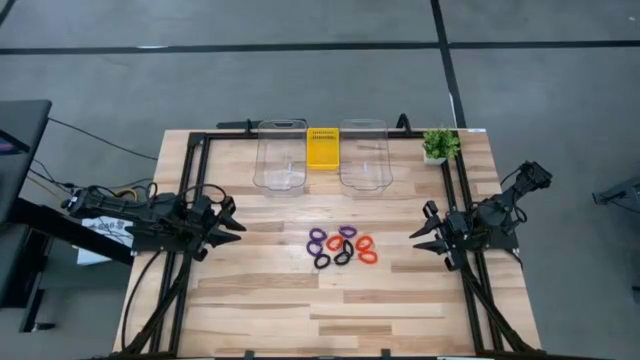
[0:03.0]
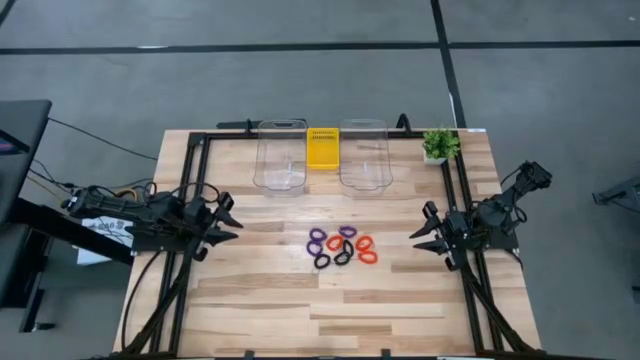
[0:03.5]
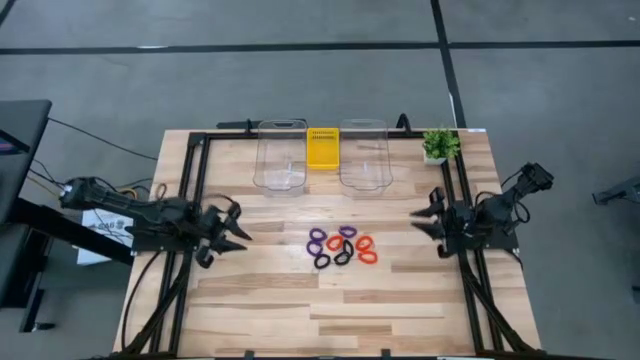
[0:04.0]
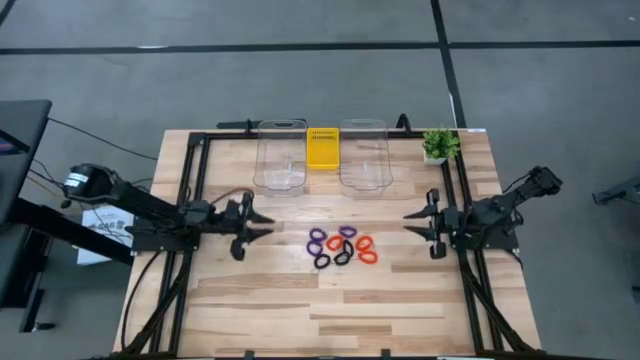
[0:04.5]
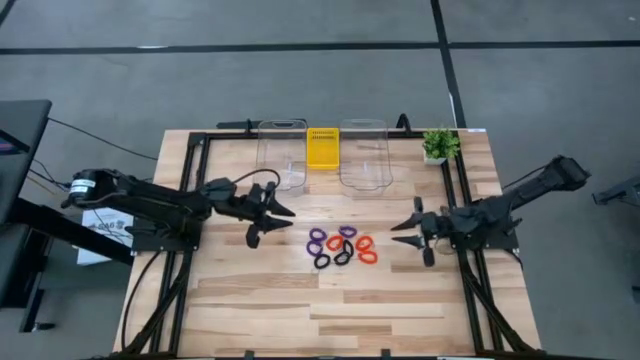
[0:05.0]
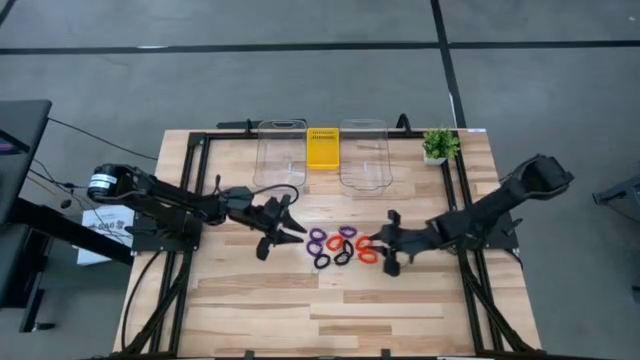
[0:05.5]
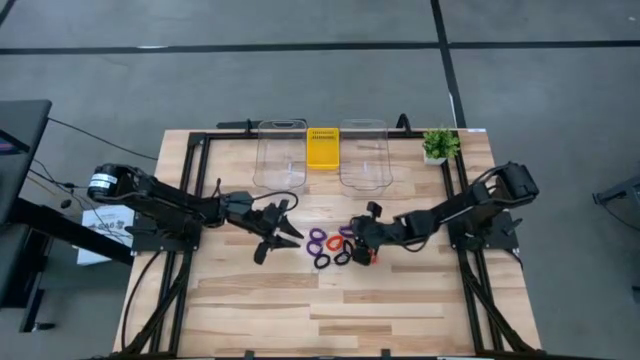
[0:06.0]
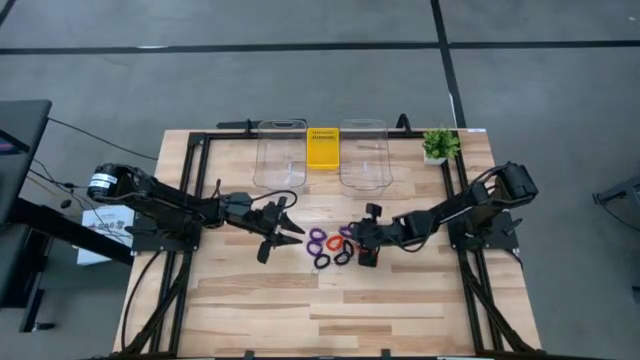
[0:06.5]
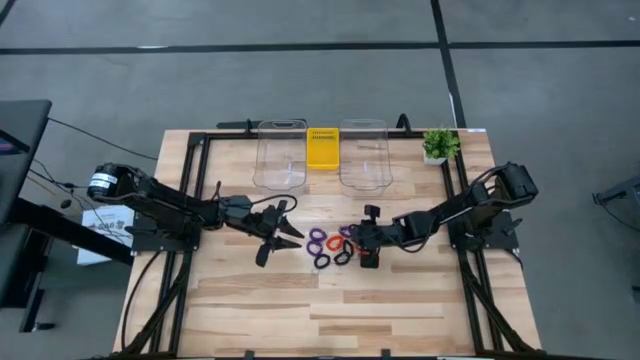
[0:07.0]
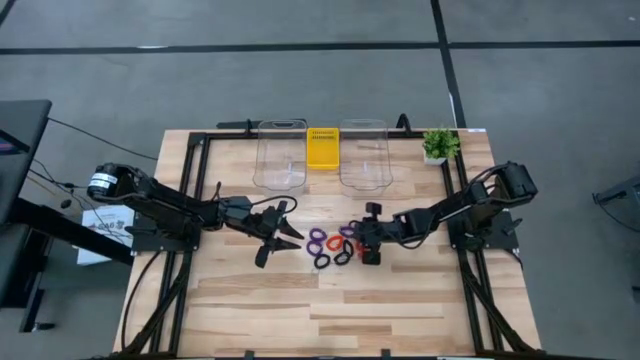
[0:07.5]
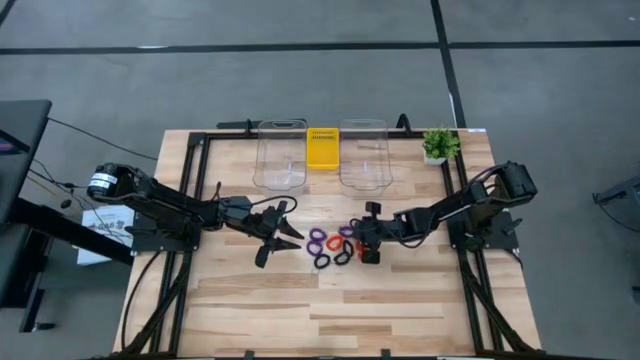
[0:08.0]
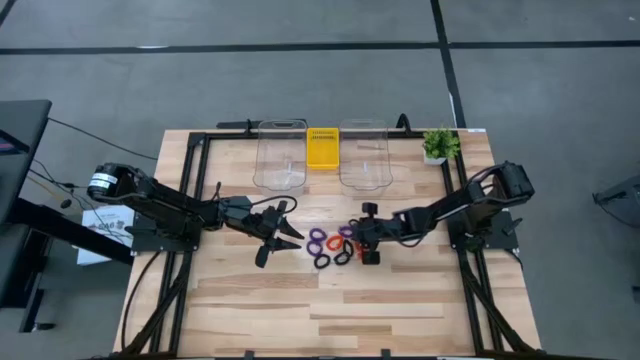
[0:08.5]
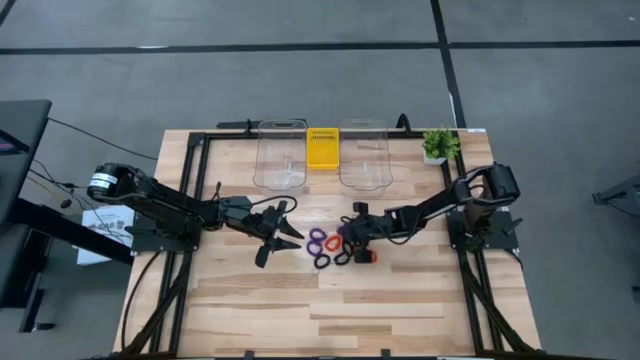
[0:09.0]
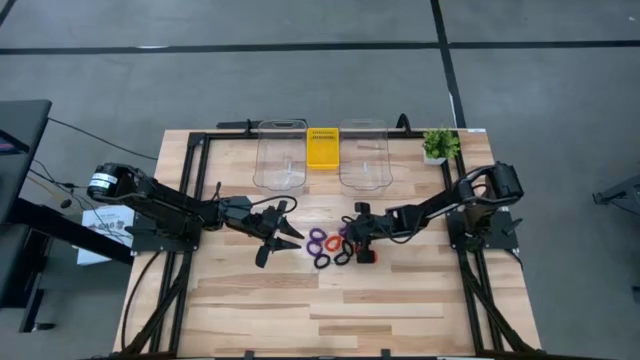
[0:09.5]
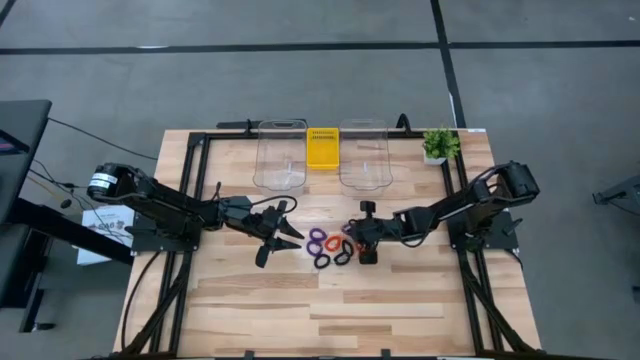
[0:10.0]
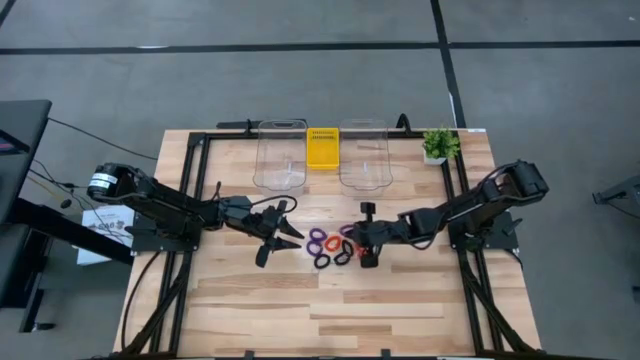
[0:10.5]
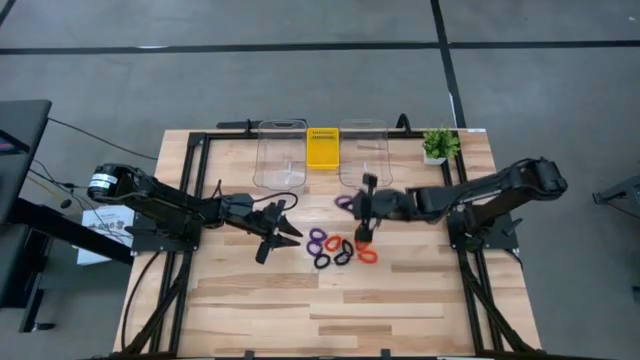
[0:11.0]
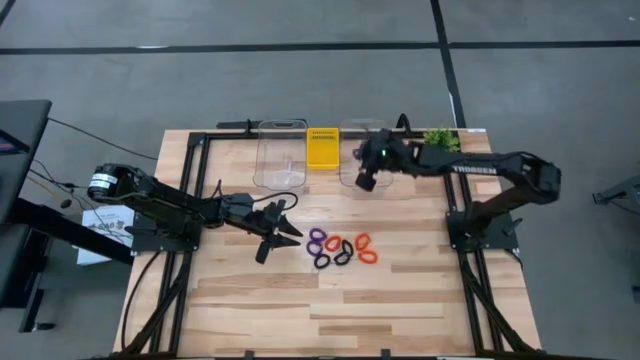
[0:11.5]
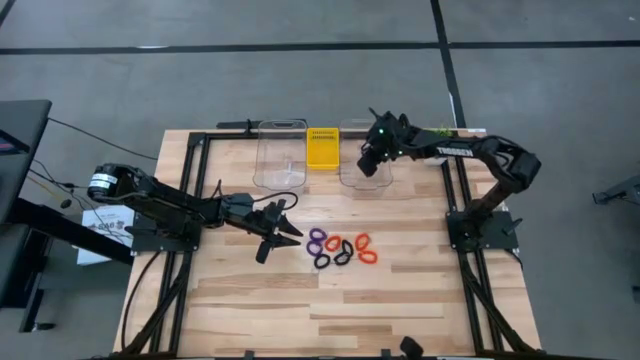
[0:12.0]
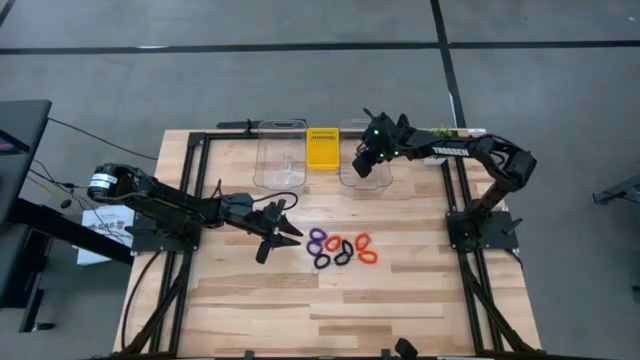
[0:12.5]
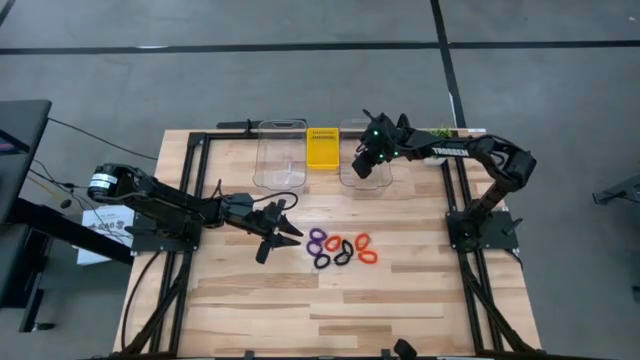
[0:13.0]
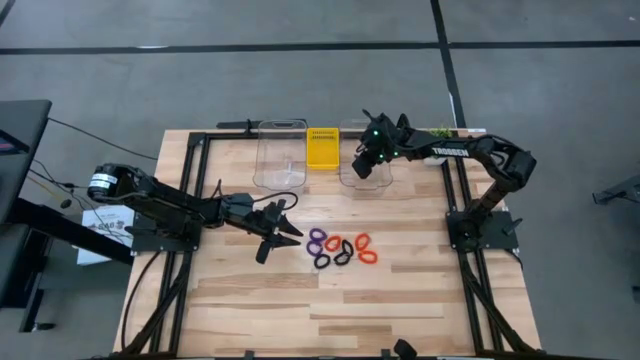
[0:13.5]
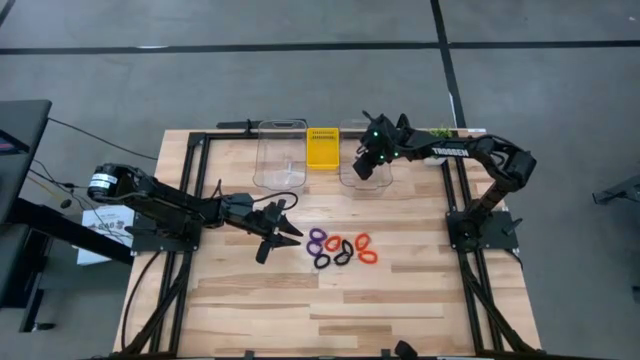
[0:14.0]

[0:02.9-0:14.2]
Task: Sort spring keychains
Put the top right violet spring keychain into the right transparent bin

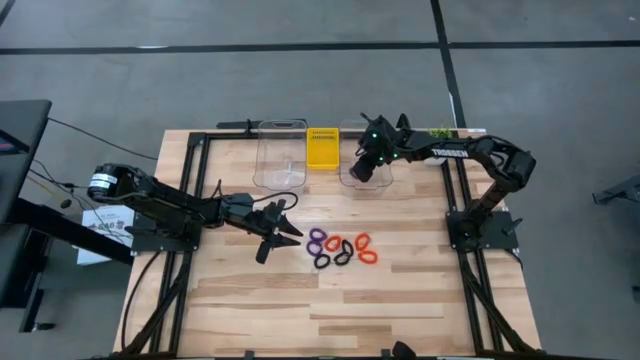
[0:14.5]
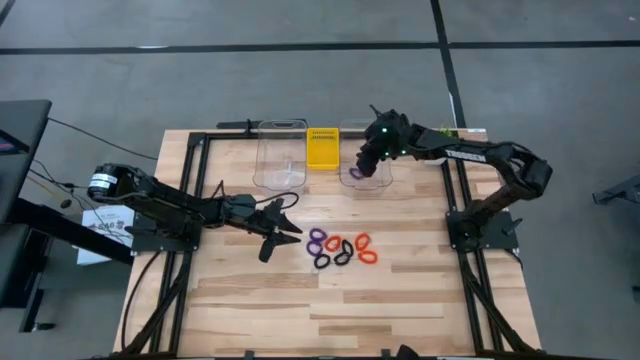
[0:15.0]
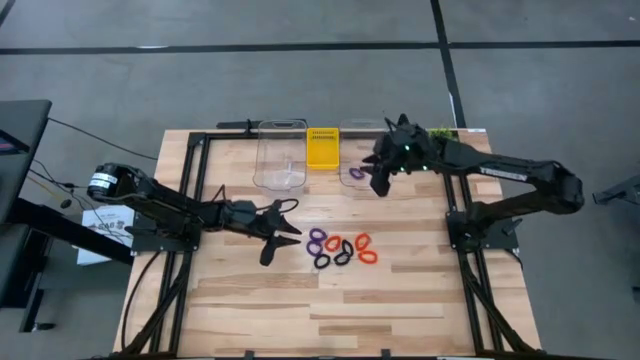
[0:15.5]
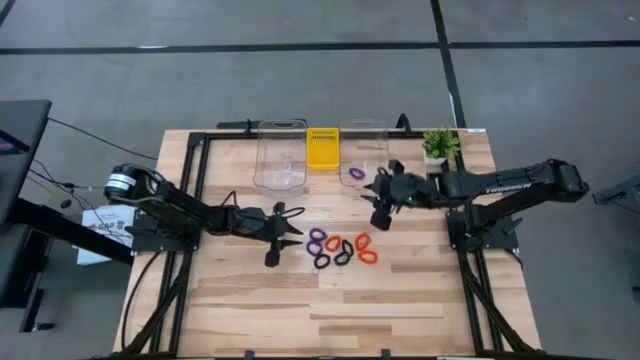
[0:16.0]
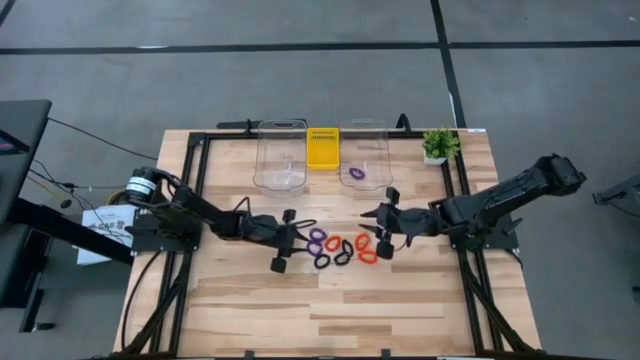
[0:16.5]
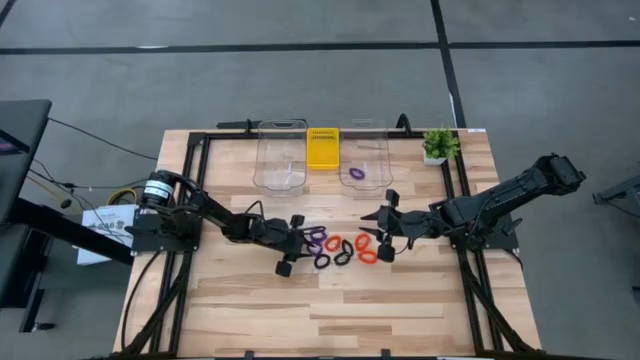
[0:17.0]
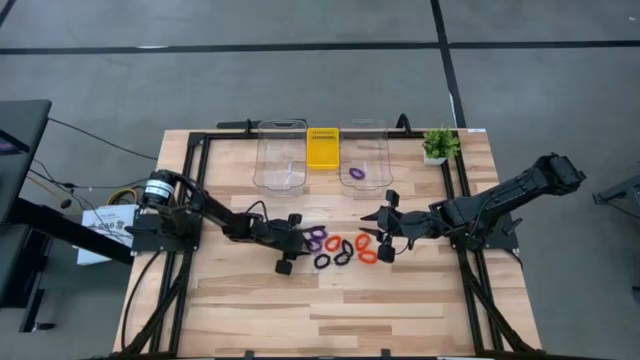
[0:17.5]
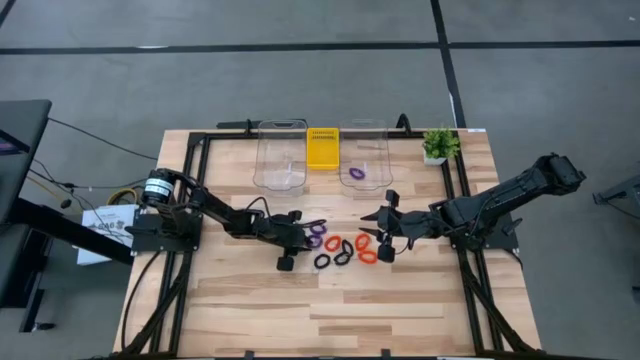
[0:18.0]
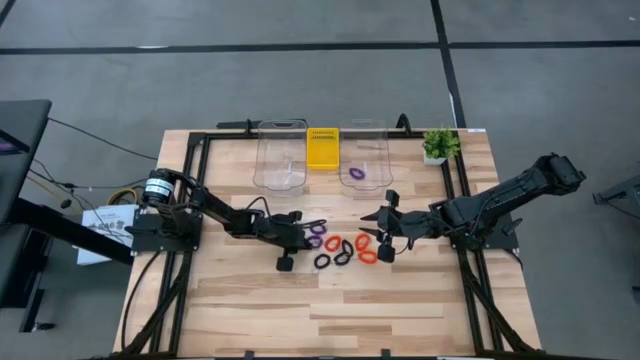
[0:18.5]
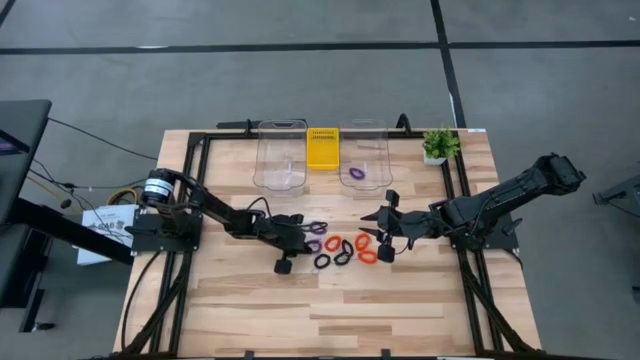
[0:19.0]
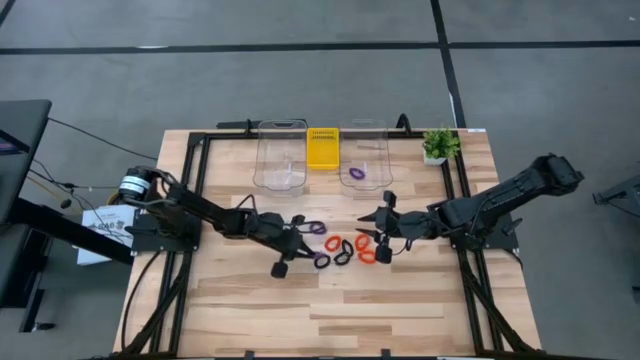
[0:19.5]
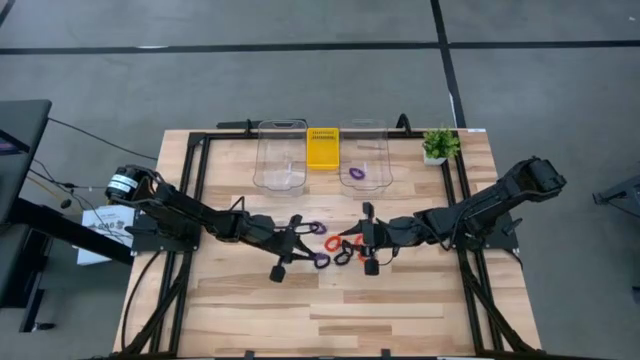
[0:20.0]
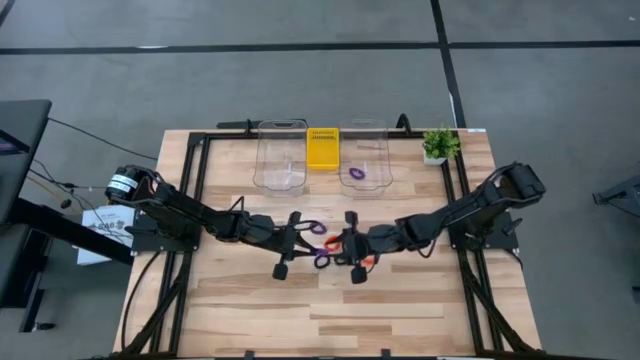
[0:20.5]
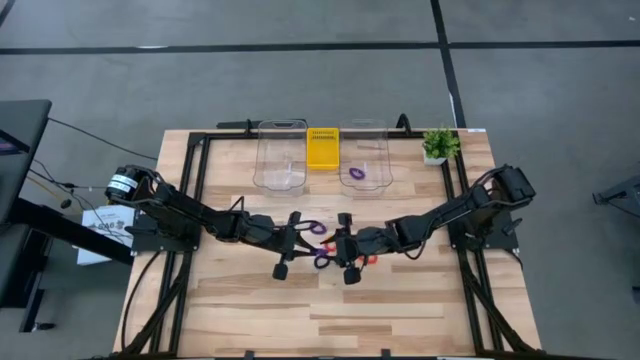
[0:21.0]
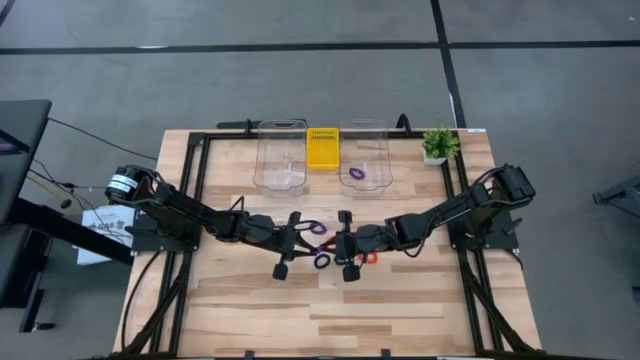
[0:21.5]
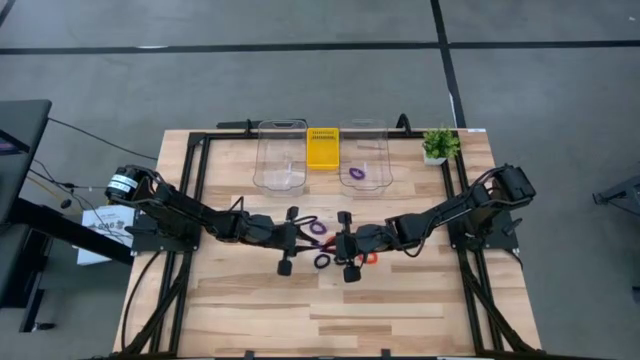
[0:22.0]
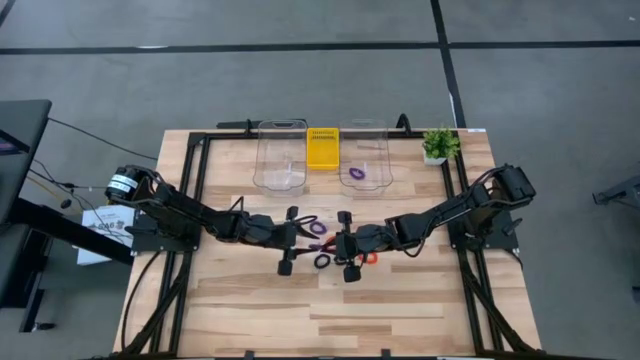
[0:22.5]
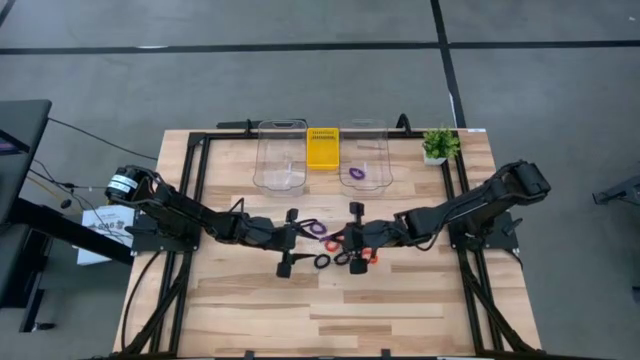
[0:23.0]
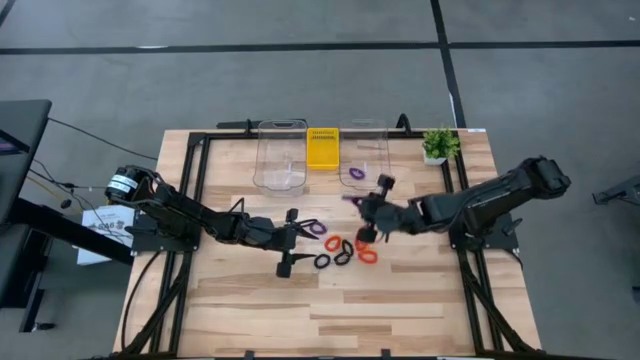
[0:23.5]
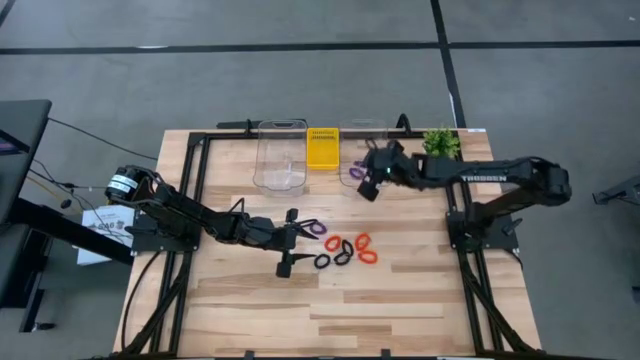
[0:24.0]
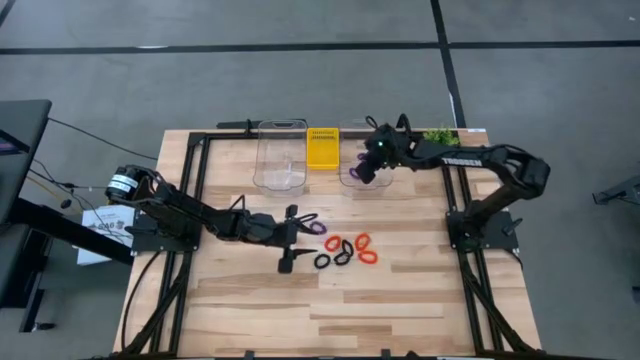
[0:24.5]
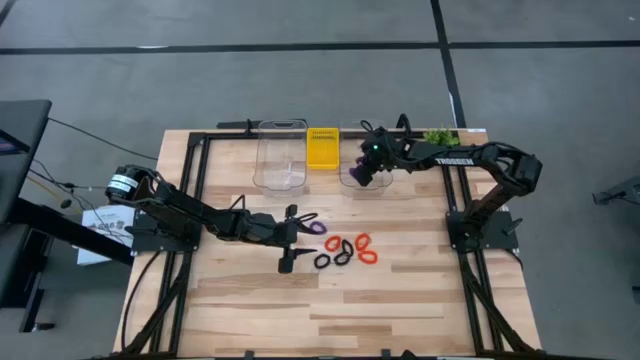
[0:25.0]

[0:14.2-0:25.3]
Put the bottom violet spring keychain into the right transparent bin
